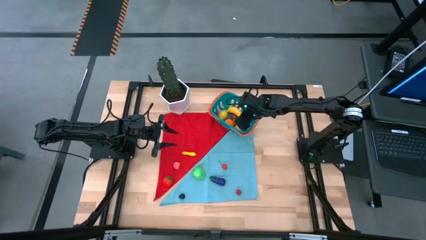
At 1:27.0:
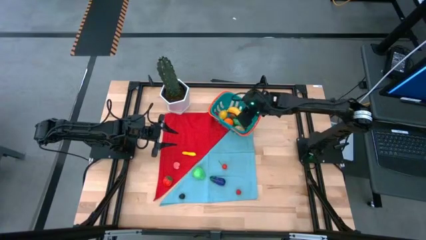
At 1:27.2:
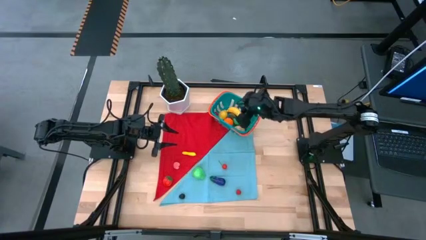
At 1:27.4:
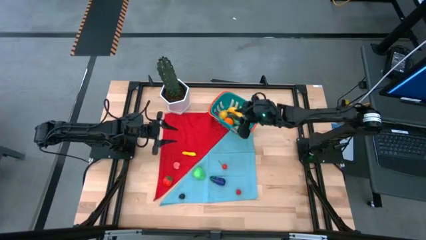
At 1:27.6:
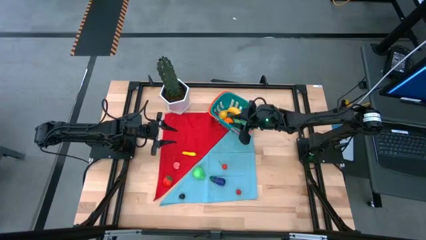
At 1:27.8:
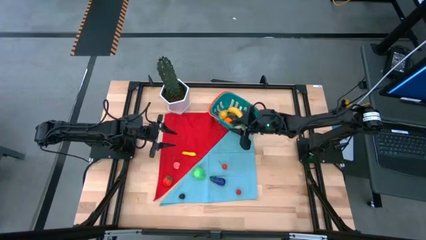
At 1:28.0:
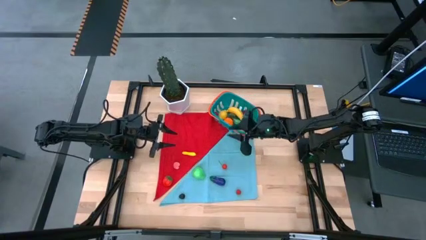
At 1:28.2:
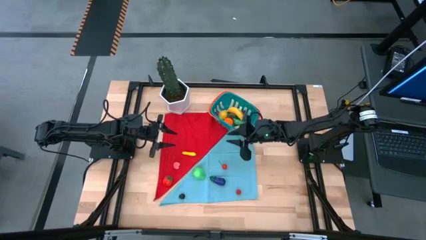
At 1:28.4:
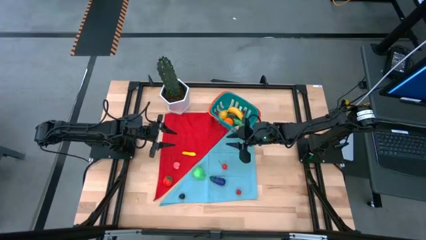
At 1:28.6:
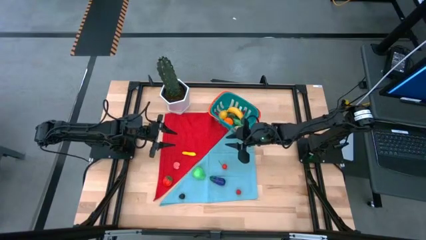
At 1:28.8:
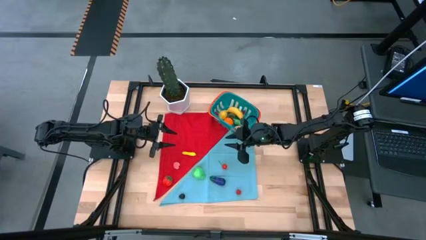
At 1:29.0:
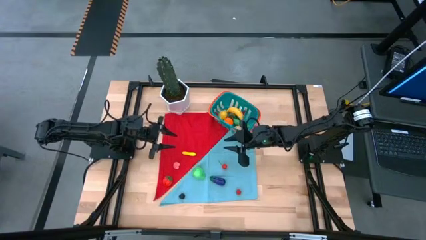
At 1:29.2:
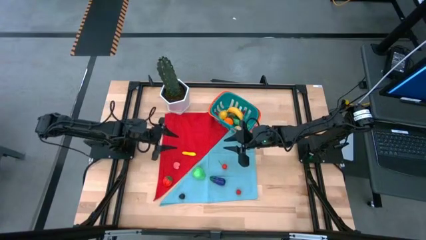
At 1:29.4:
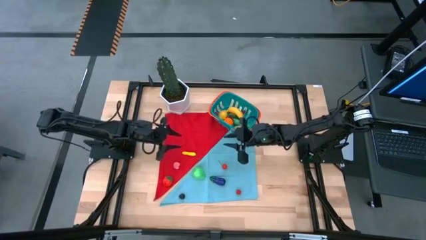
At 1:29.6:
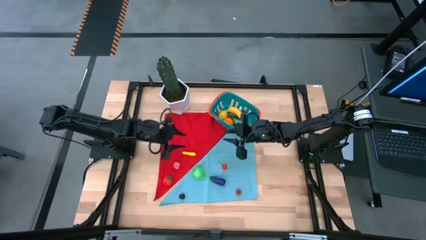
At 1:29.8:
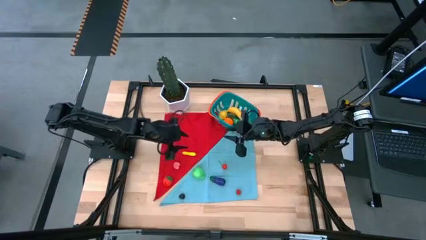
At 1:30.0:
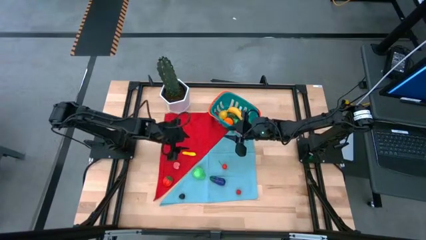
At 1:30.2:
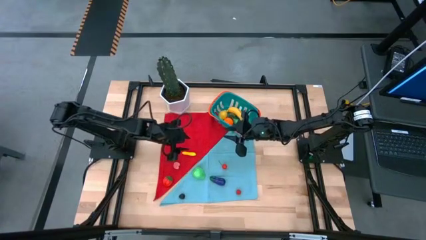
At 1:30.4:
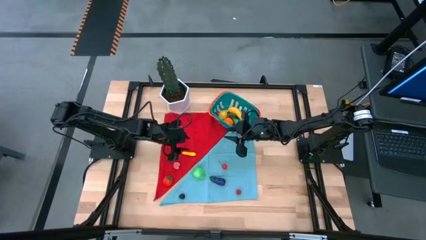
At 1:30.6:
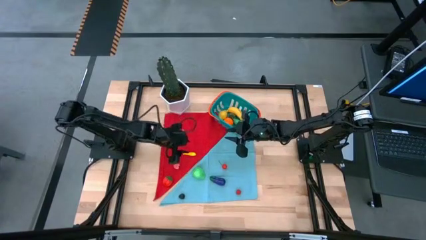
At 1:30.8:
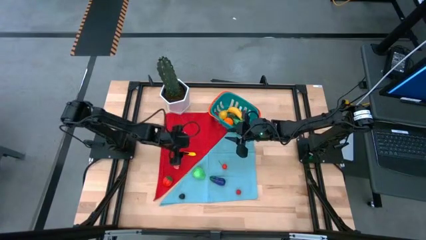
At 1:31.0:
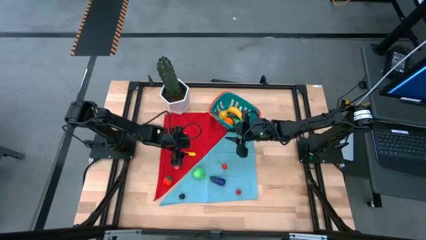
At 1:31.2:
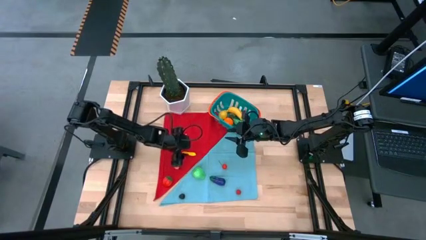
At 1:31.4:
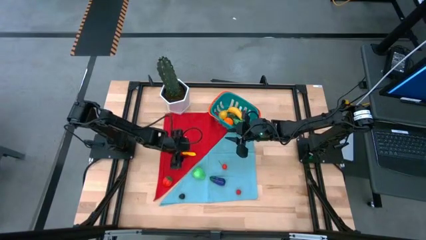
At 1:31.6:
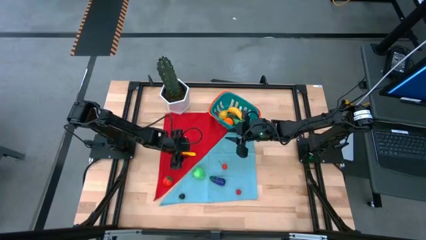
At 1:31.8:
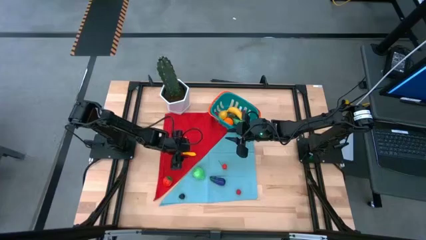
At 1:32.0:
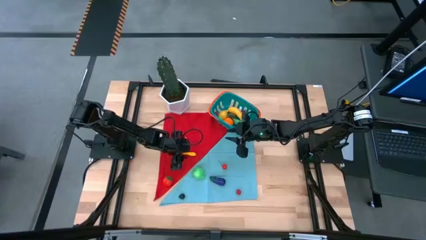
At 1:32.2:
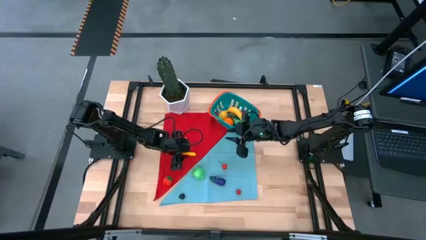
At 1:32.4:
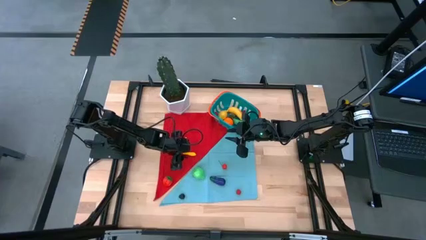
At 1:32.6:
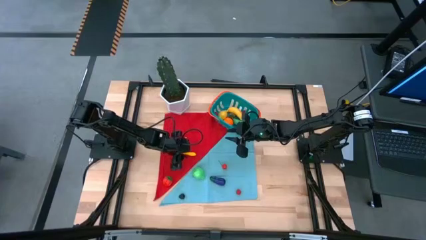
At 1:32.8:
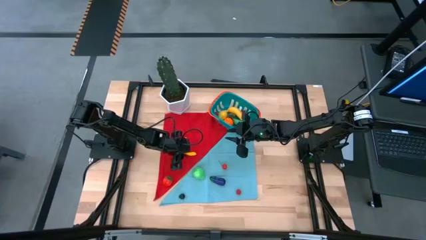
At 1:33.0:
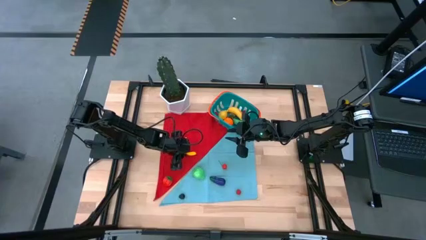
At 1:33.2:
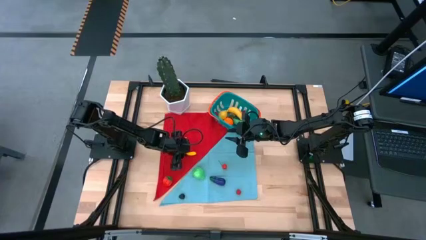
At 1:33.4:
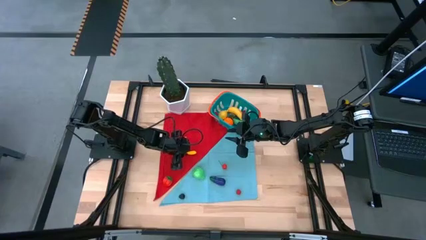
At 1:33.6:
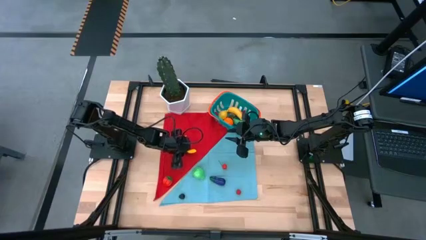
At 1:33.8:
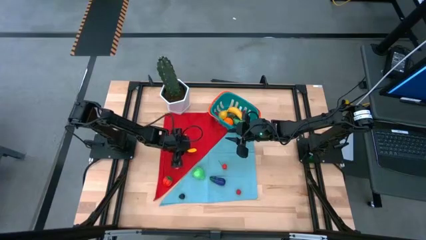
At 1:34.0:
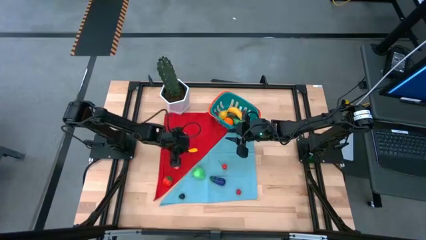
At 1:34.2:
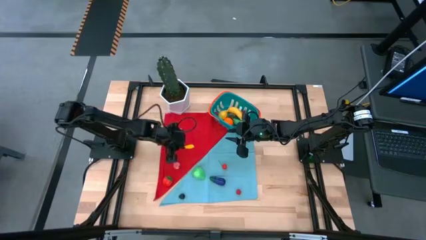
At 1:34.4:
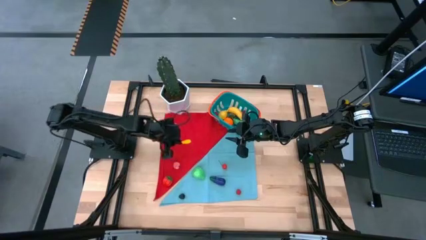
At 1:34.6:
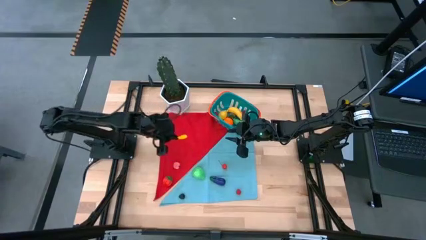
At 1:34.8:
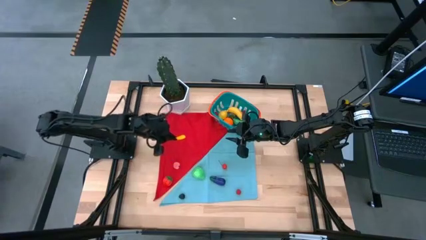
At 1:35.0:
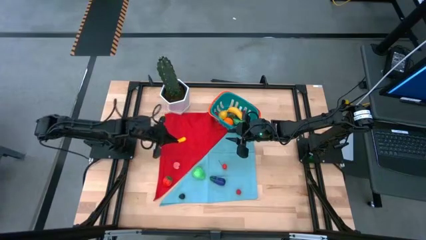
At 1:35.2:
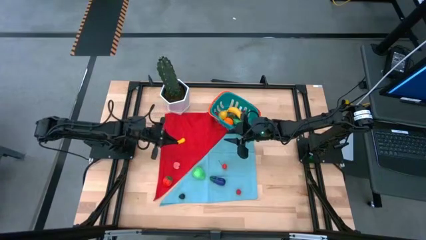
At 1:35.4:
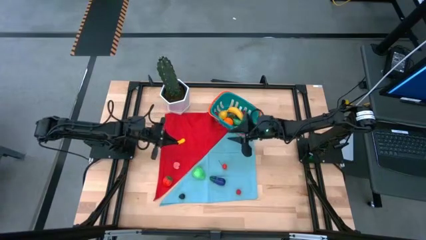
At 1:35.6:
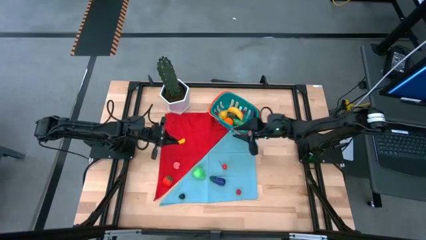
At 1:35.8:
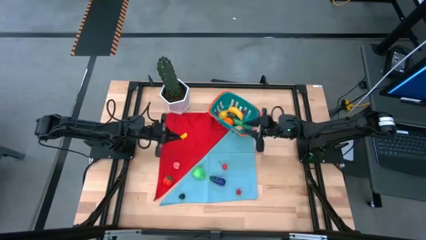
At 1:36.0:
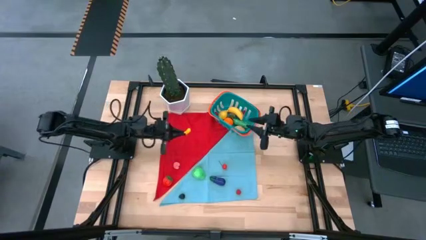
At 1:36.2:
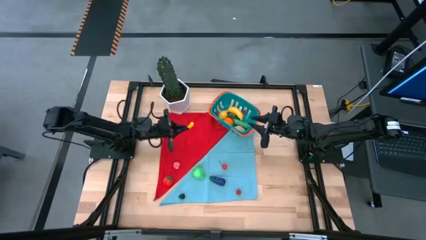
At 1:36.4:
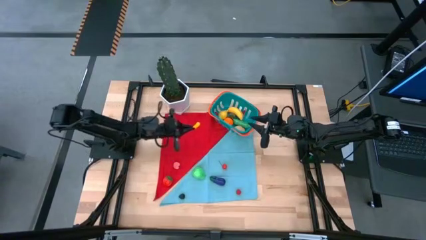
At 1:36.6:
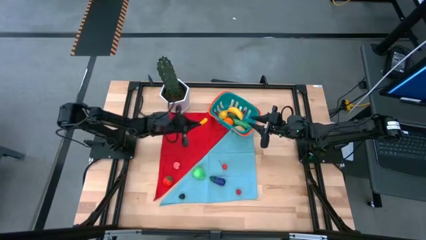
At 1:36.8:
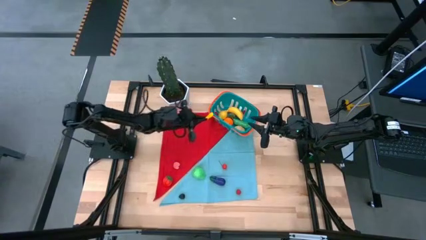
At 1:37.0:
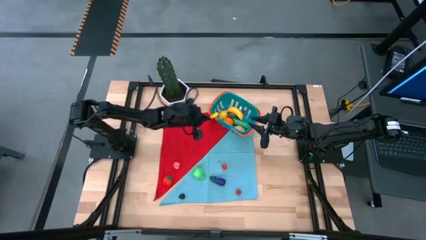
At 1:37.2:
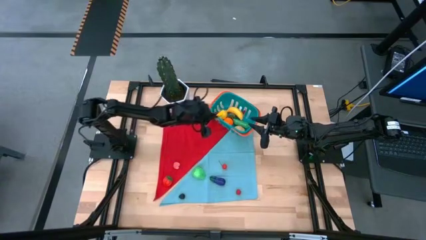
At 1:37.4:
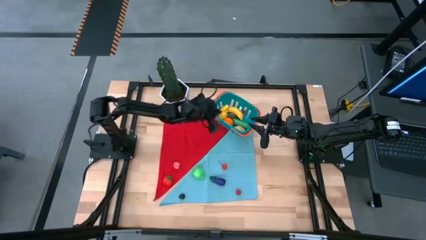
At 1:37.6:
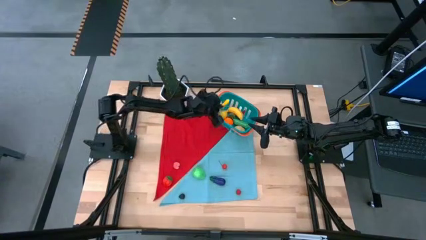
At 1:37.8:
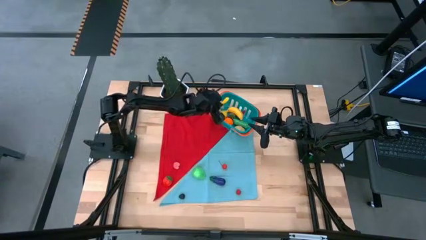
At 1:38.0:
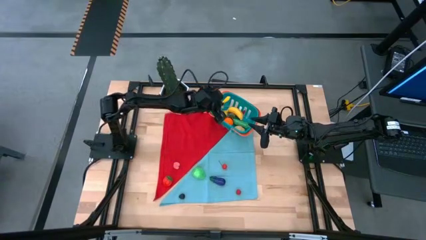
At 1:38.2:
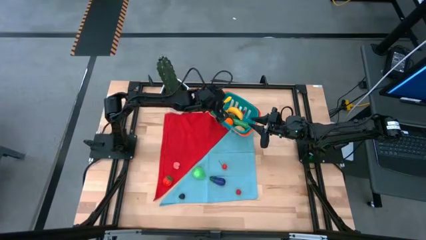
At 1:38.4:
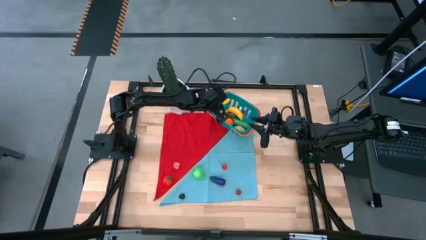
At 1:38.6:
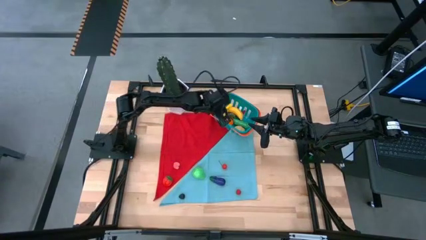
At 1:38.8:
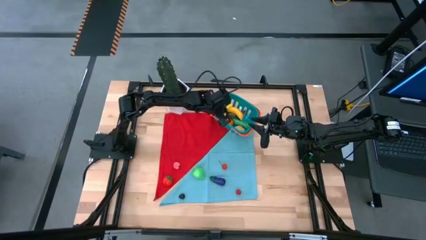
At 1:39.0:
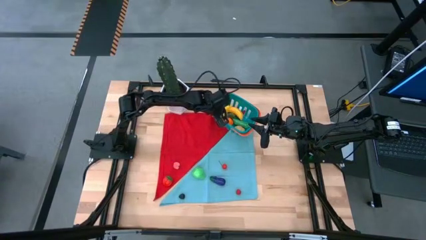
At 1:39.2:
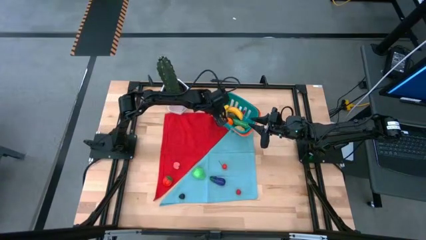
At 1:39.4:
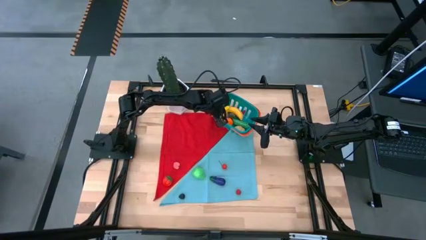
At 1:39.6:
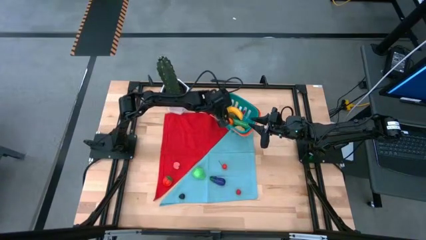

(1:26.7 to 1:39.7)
Task: Pick and placing Produce into tupperware
Put the yellow corn into the blue basket
